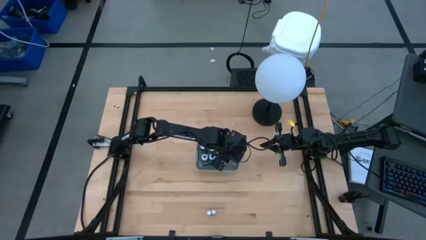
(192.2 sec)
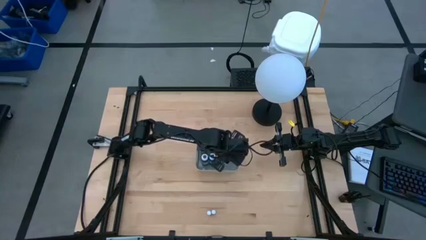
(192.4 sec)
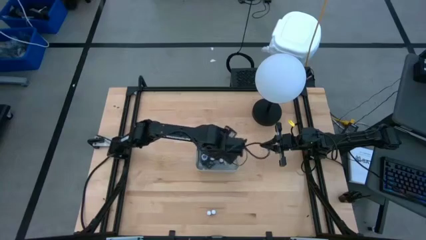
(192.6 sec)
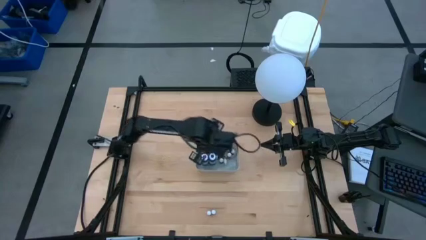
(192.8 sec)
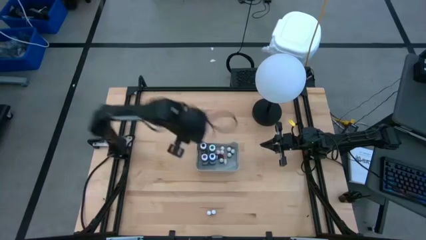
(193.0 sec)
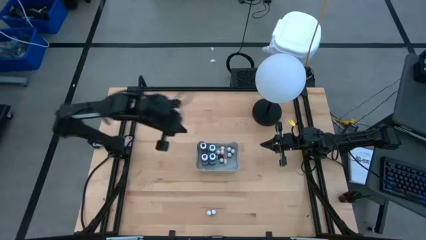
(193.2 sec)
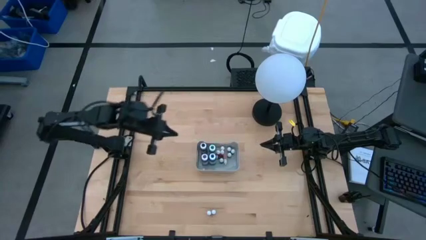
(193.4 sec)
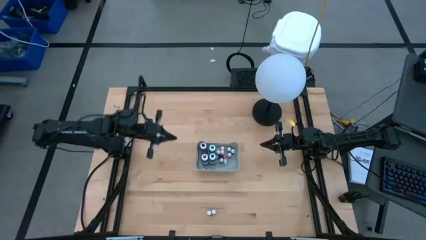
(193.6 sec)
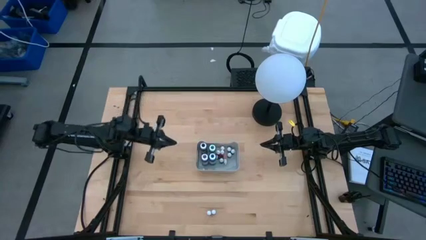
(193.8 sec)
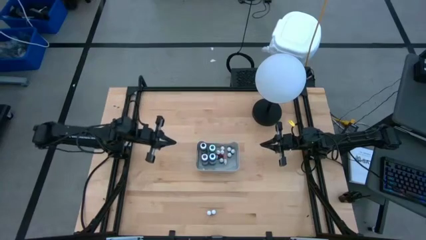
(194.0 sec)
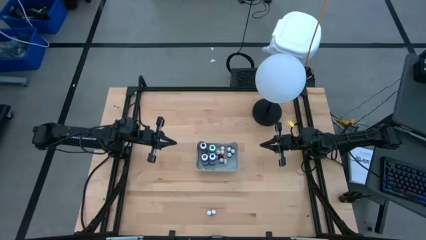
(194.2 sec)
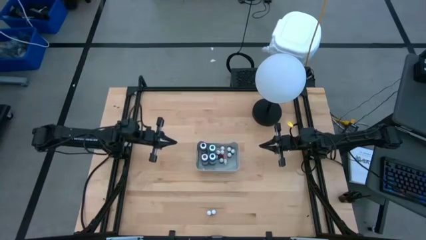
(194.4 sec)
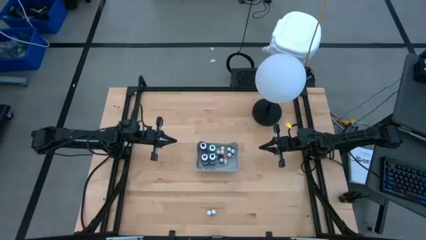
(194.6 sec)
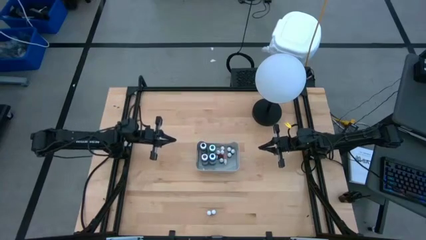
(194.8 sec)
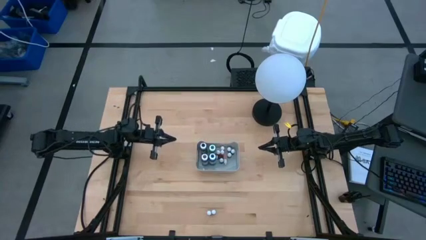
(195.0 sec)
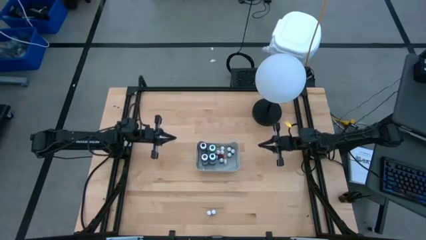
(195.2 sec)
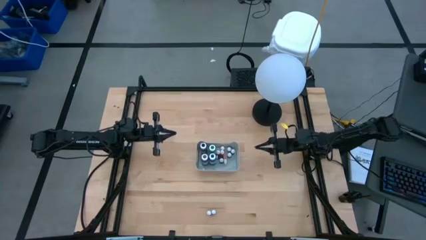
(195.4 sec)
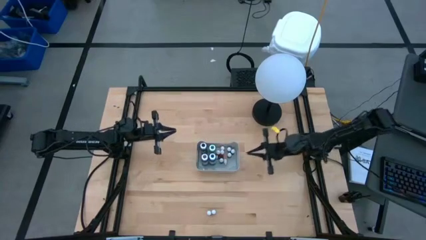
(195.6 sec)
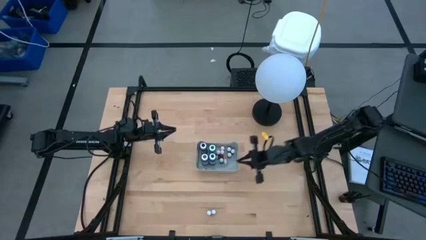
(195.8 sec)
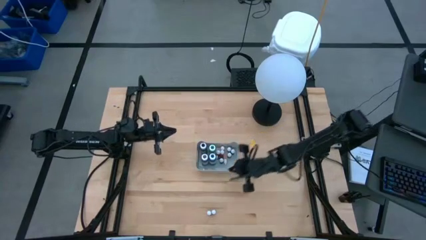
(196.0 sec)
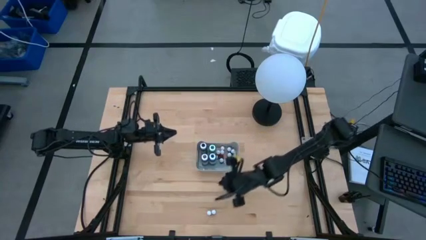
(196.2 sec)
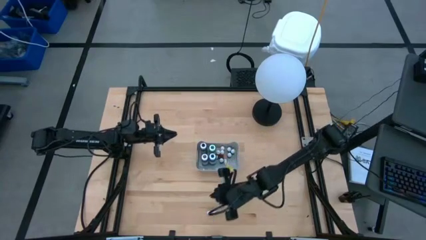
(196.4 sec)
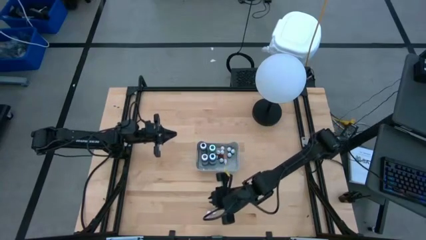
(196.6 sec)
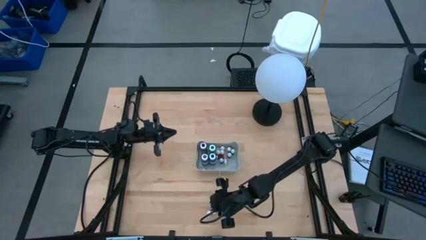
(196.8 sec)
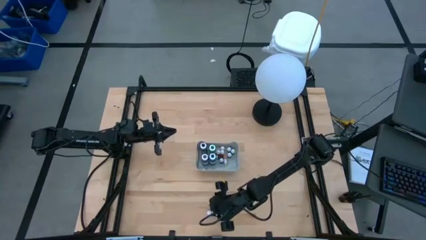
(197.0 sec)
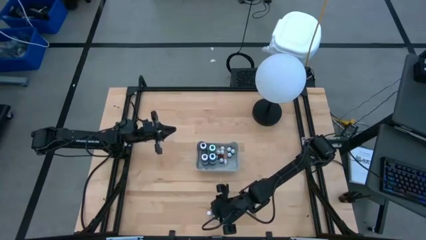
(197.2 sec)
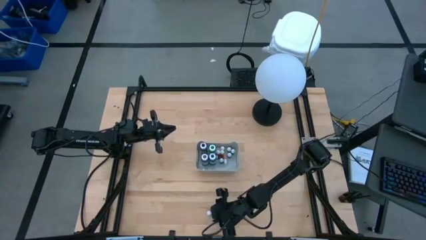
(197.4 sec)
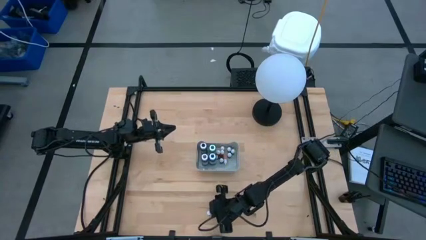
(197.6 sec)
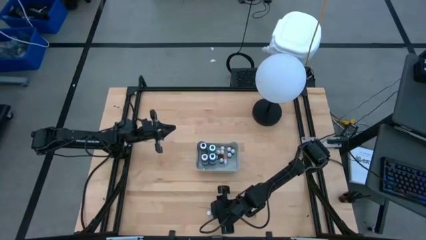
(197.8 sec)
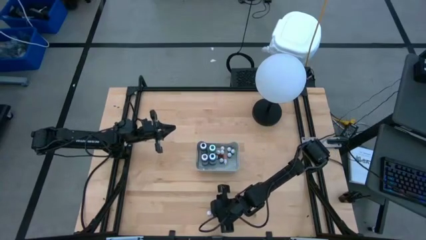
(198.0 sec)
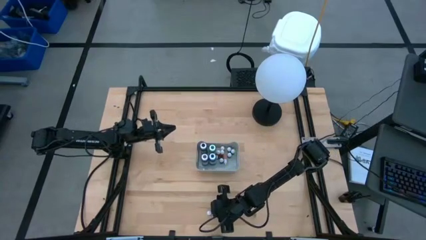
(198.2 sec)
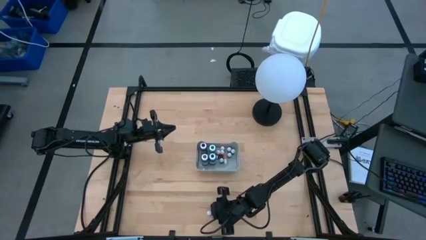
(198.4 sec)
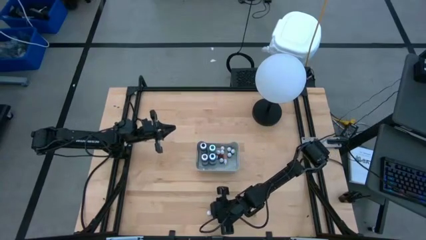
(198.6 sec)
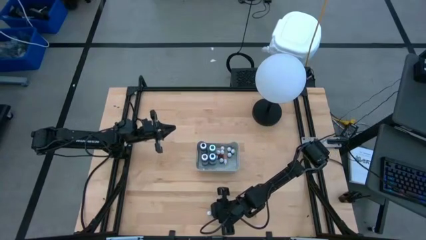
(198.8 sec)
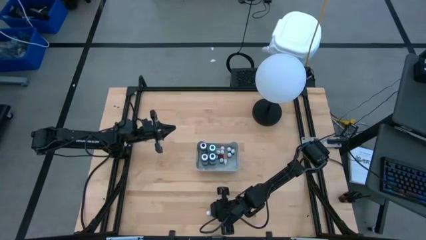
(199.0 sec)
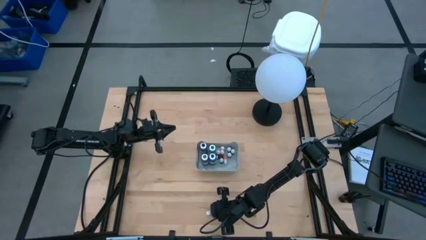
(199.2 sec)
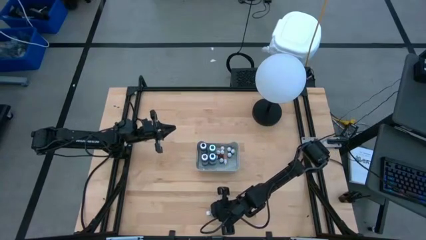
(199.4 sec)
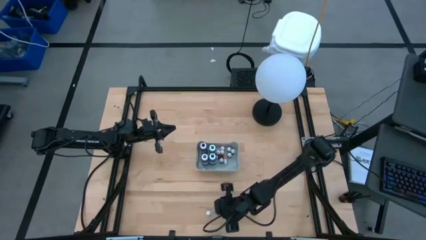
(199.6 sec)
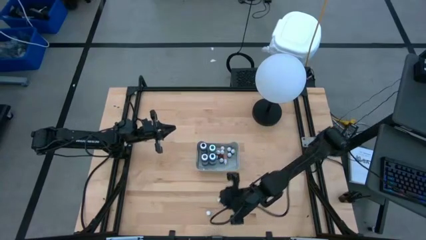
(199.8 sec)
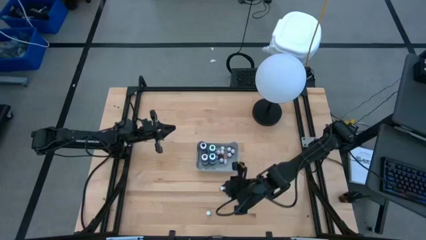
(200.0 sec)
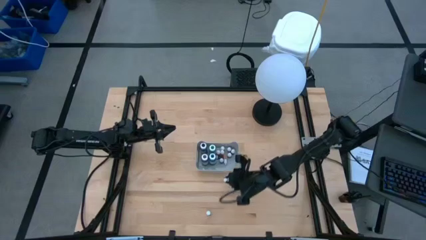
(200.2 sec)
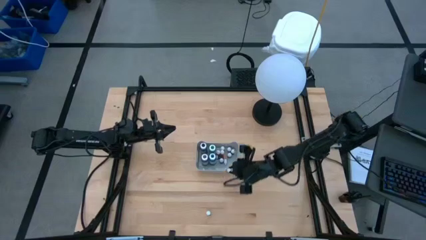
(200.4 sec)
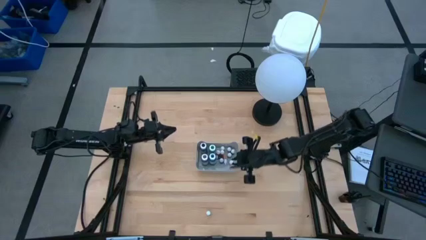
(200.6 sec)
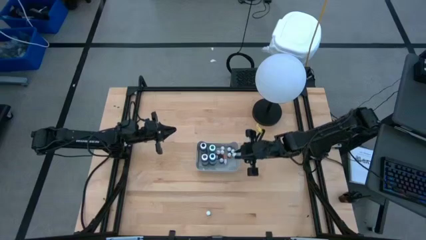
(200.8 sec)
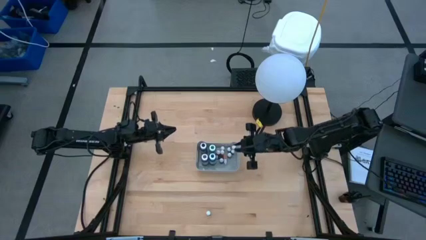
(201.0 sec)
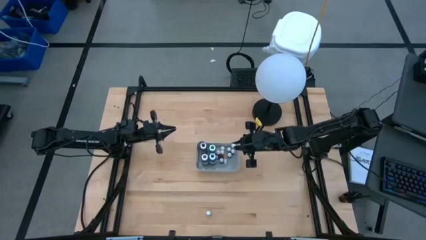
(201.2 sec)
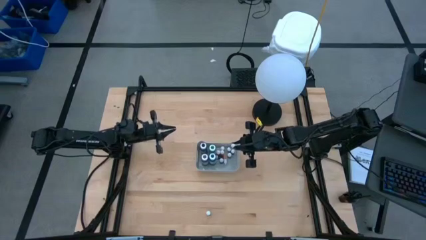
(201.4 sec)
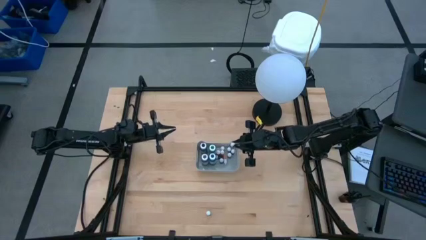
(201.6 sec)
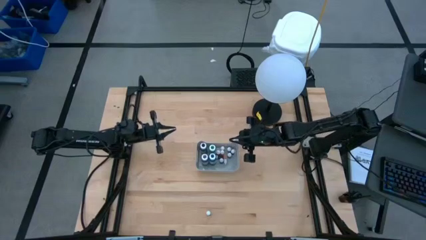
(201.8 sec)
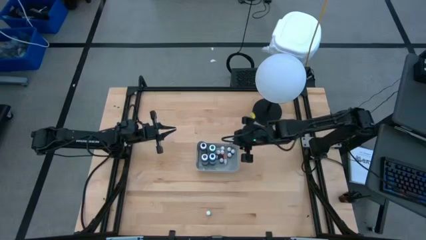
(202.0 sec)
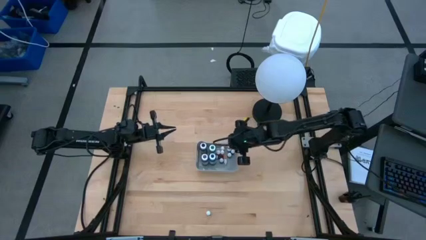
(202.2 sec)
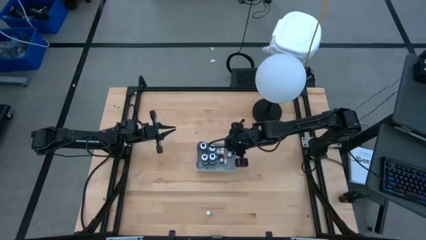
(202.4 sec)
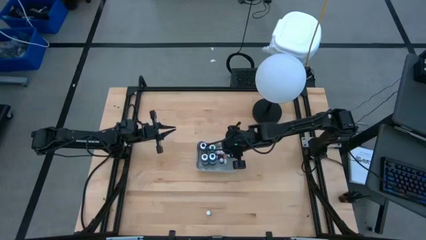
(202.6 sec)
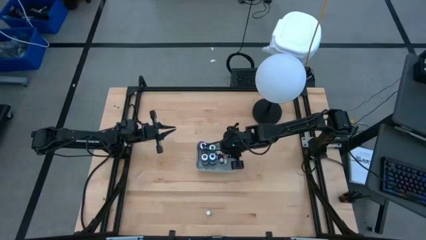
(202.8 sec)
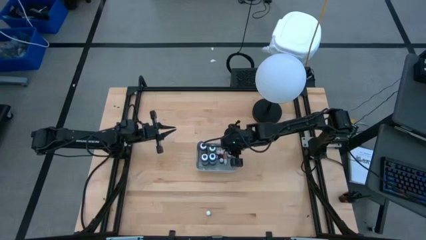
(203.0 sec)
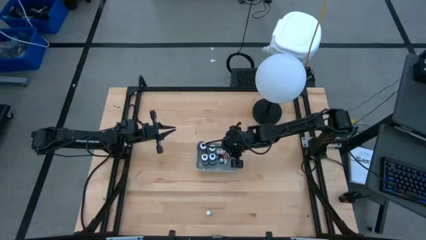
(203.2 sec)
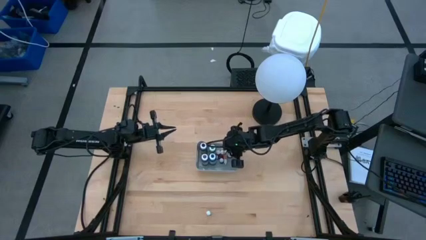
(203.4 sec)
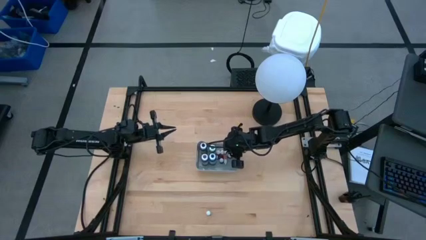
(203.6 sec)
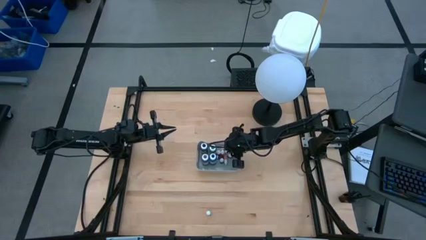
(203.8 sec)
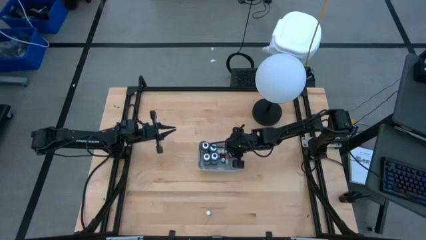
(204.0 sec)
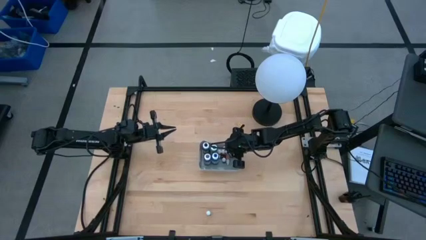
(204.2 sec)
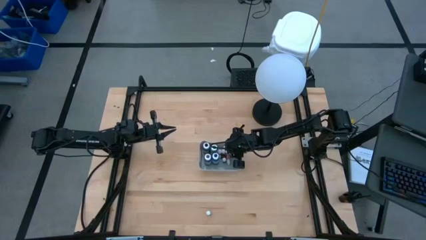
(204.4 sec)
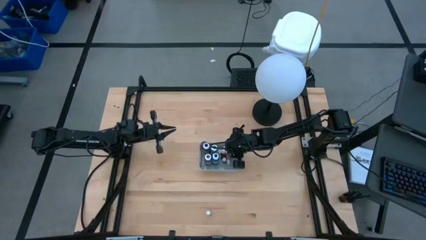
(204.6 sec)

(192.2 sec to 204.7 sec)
Task: Pick & Place food coloring
Put the small red food coloring bottle into the gray bin

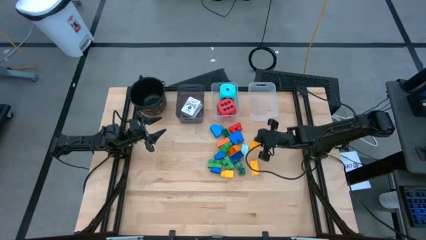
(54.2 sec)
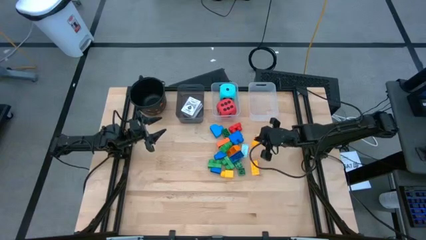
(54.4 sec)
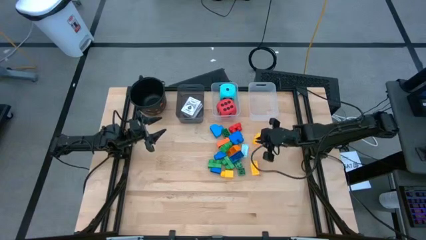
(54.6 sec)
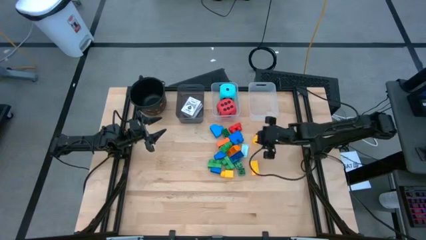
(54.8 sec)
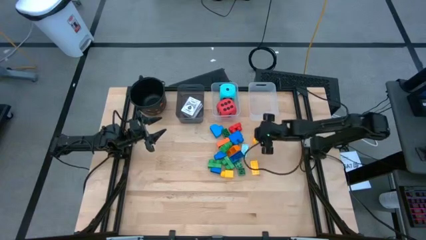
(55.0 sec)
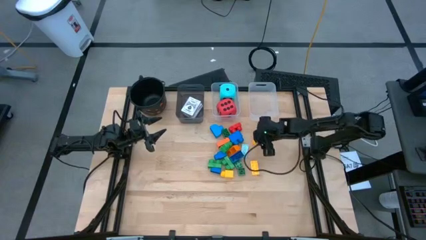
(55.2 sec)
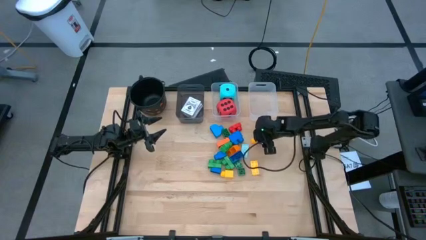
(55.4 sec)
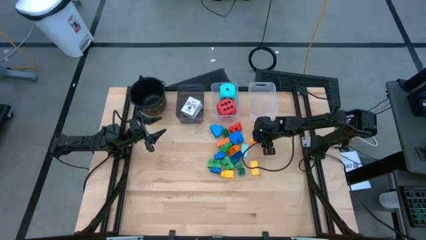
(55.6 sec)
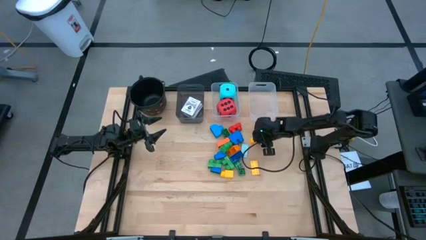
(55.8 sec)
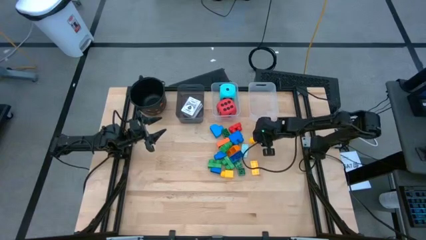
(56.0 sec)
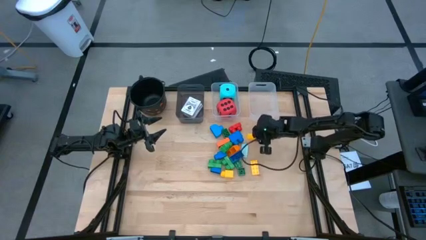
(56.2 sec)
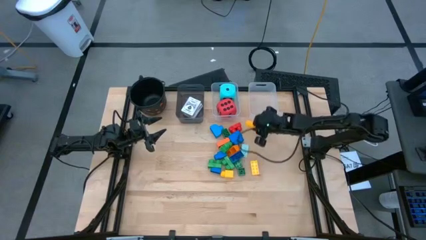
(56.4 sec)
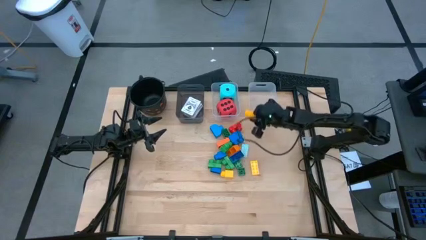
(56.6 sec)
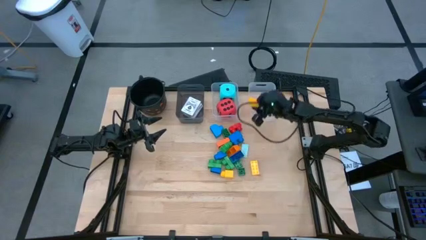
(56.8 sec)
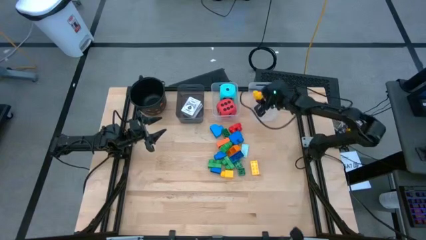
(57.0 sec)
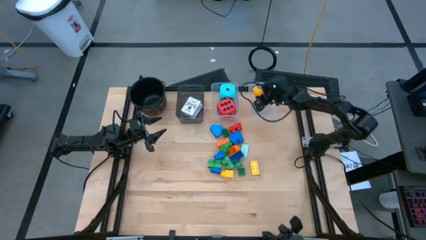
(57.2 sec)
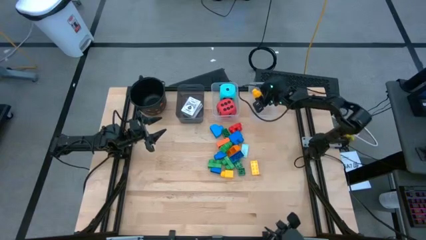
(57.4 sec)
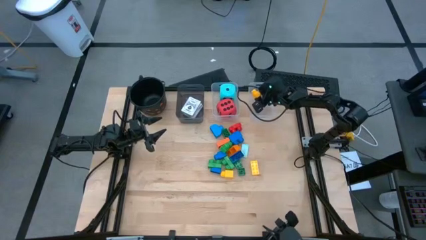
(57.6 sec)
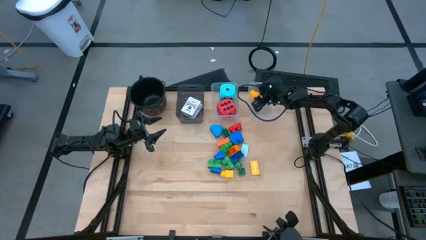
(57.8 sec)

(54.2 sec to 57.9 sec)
Task: Pick & Place Toys
Put the right yellow one stud game piece into the right transparent bin
